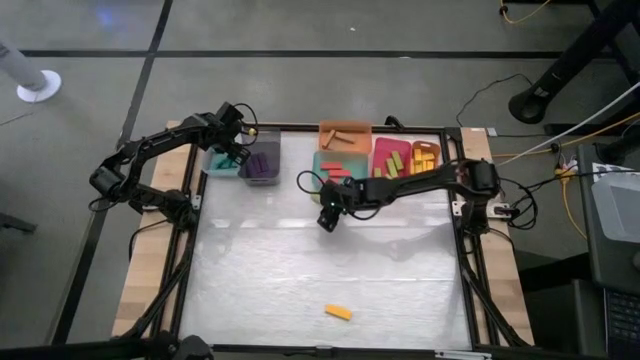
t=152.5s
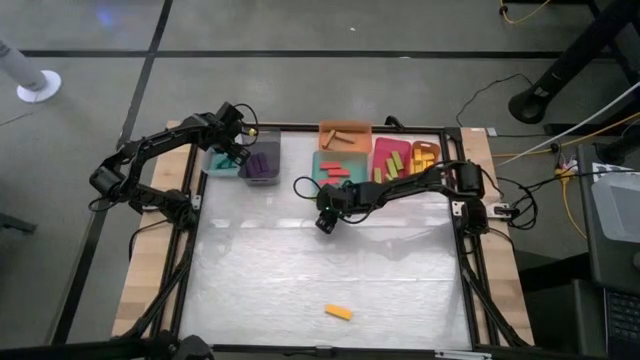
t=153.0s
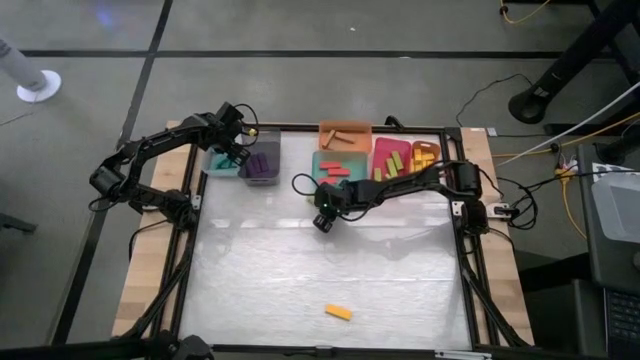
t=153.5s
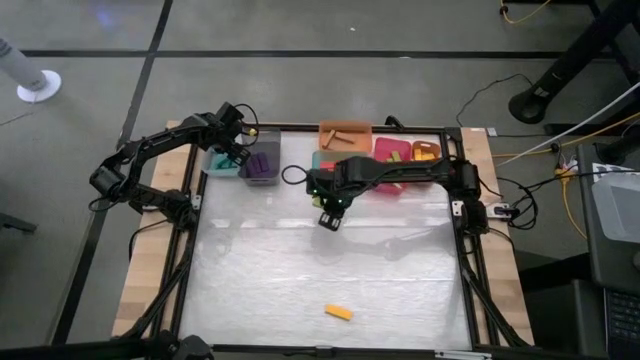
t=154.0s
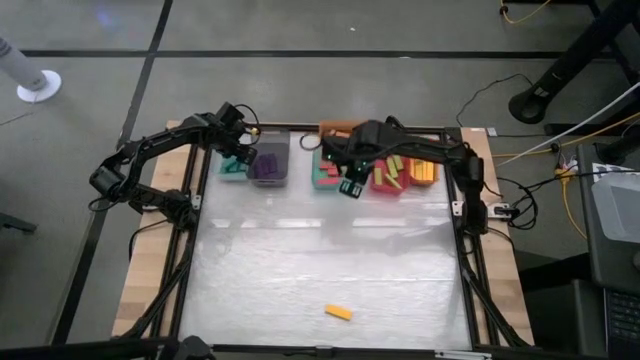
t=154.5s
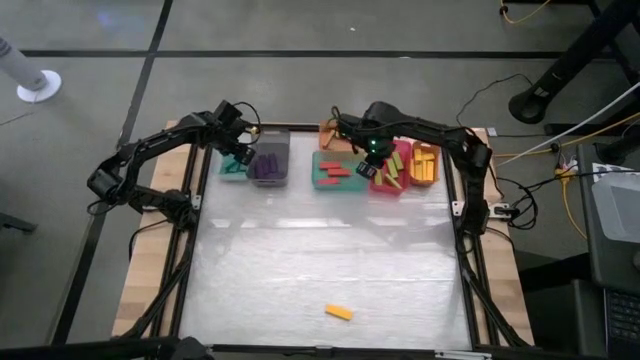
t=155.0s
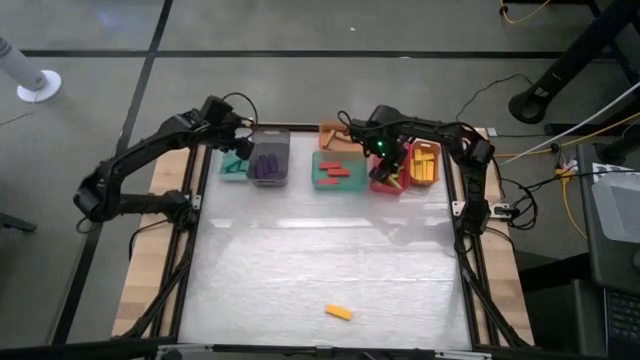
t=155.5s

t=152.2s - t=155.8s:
Task: Sort blocks
Put the light green block into the pink bin

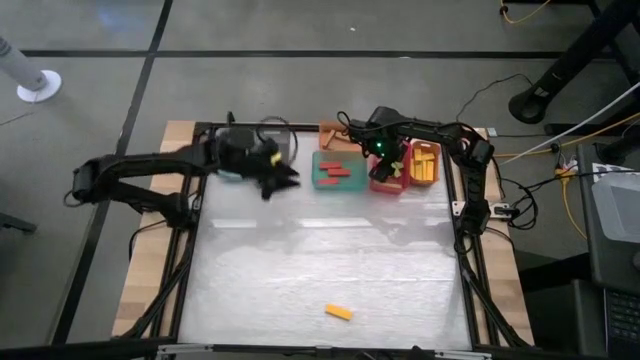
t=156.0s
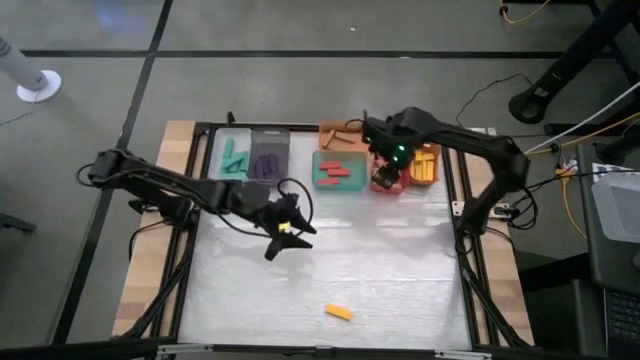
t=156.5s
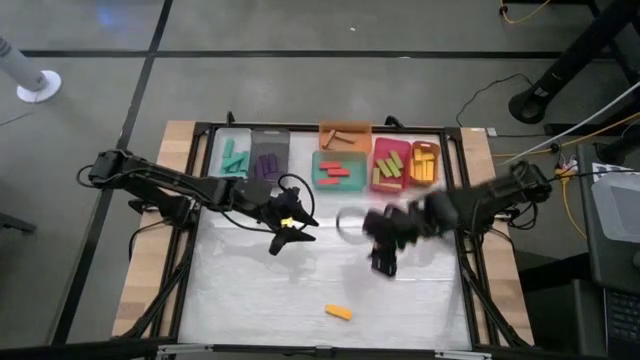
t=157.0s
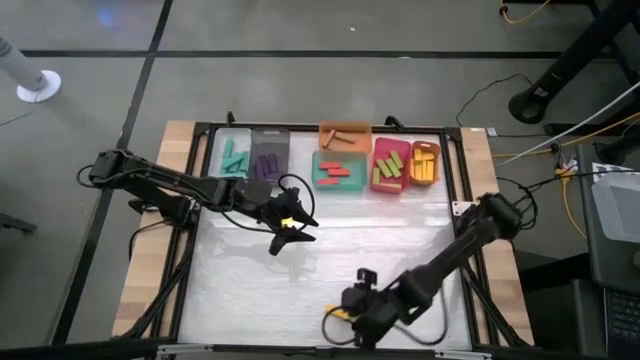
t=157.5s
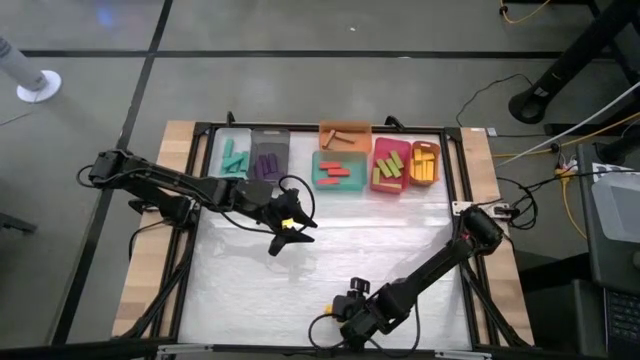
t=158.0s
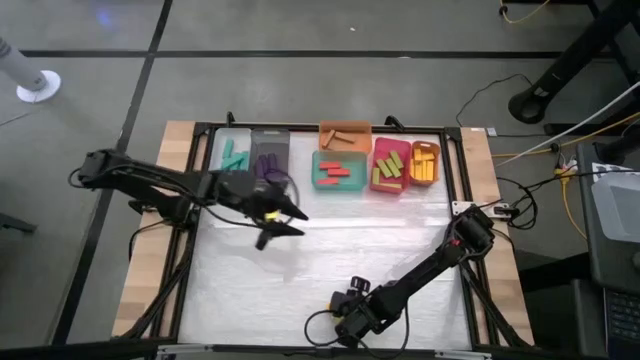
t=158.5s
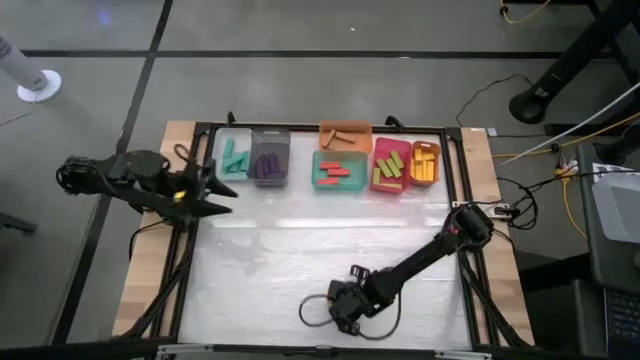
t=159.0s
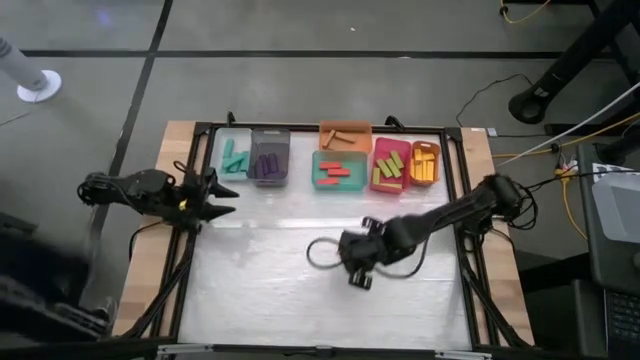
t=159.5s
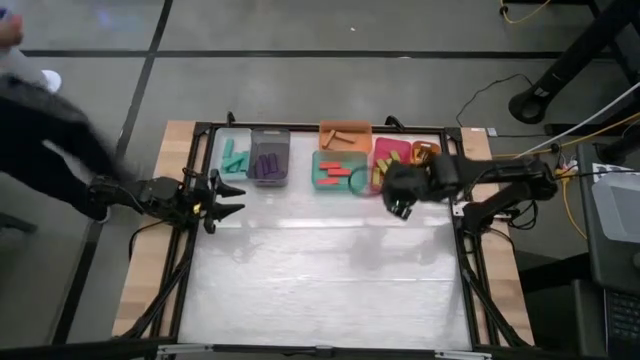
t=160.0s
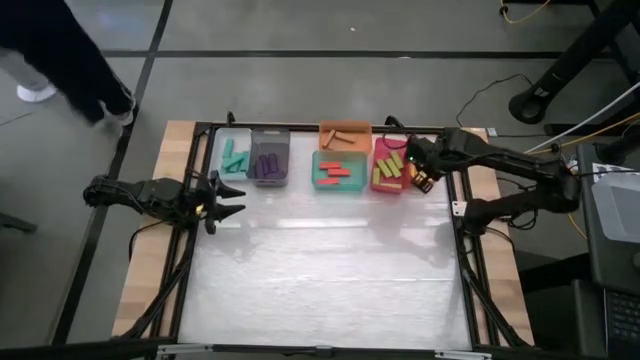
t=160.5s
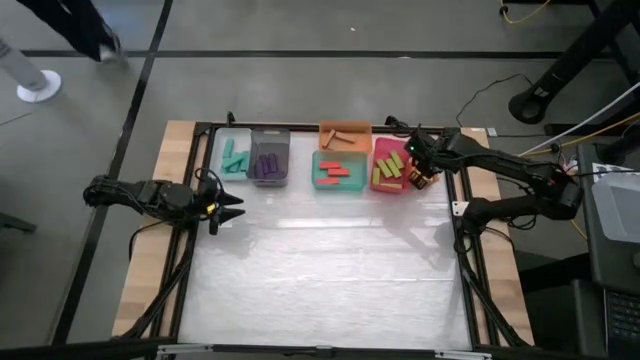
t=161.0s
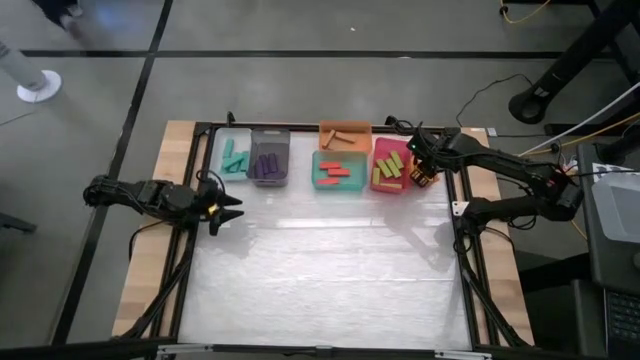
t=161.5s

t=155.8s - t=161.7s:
Put the yellow block into the right orange bin

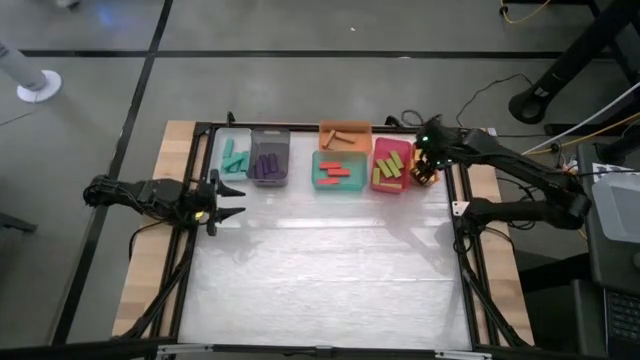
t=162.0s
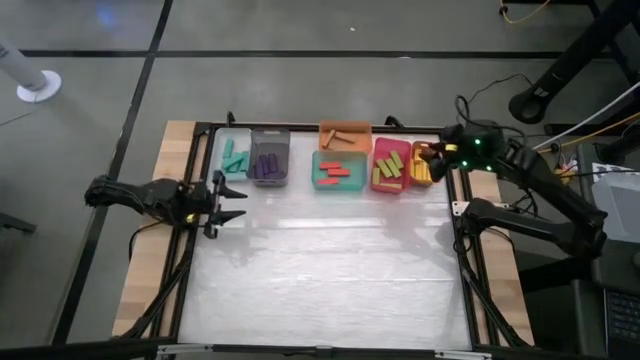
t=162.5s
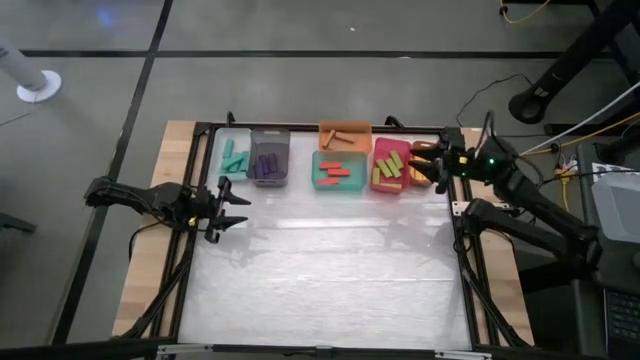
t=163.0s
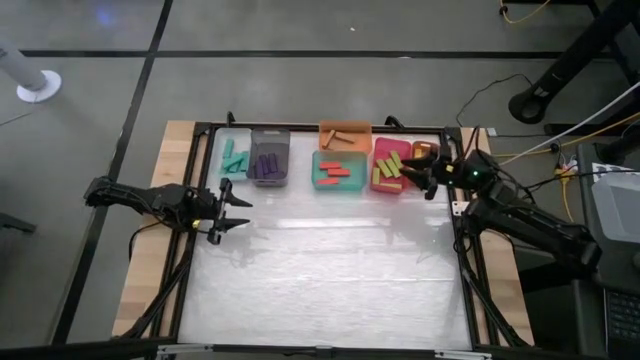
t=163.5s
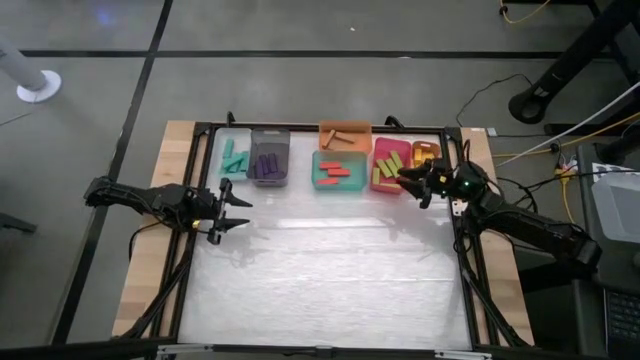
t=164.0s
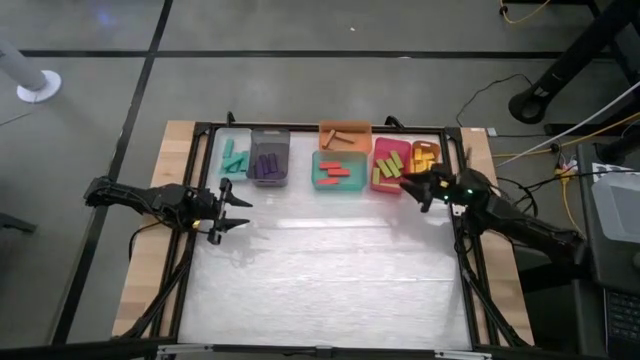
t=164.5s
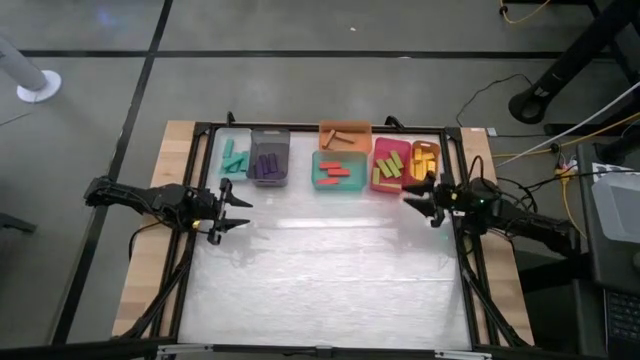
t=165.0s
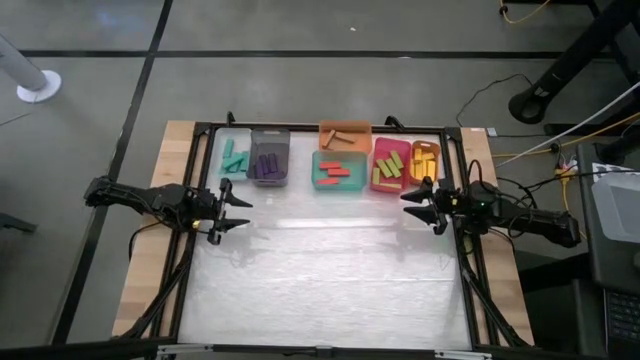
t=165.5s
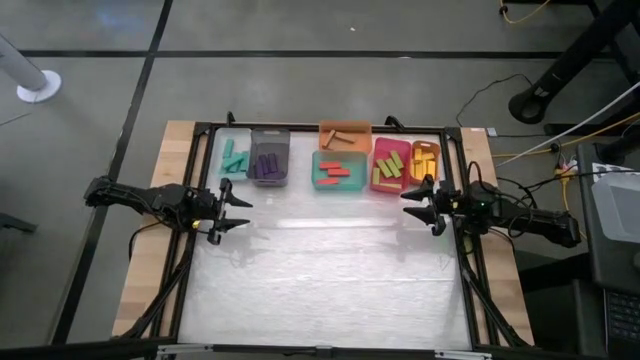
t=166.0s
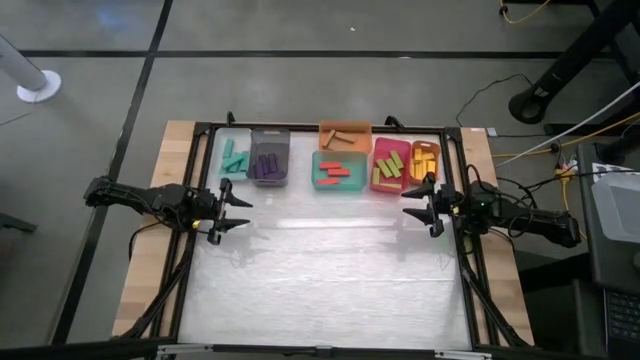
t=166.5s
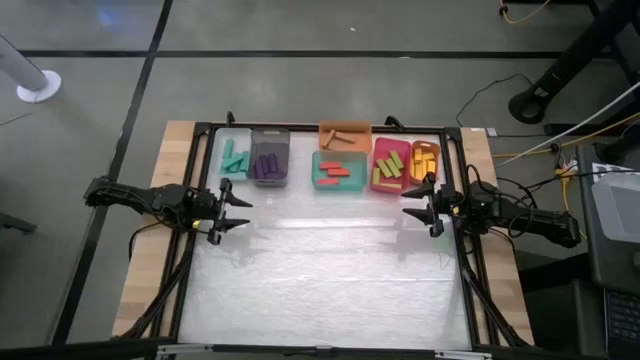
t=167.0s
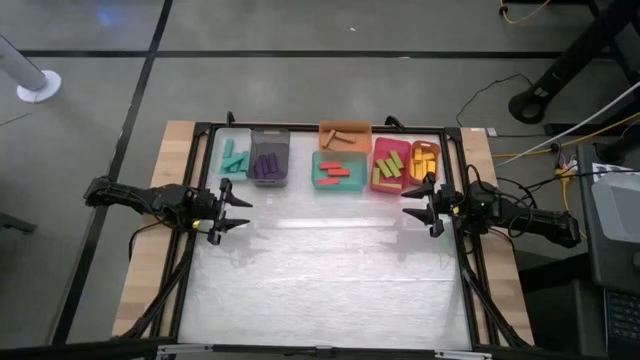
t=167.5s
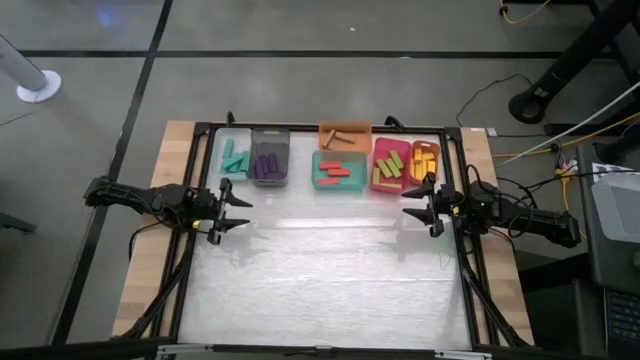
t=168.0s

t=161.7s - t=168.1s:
Return to Home Position

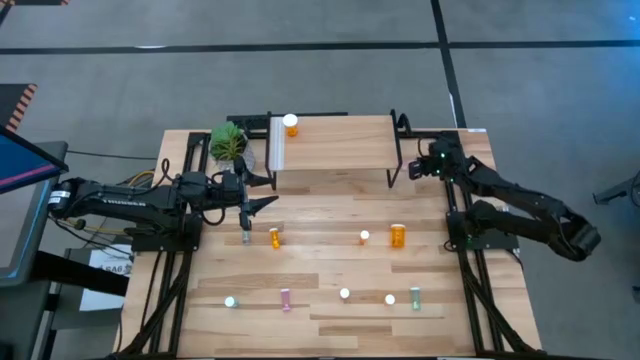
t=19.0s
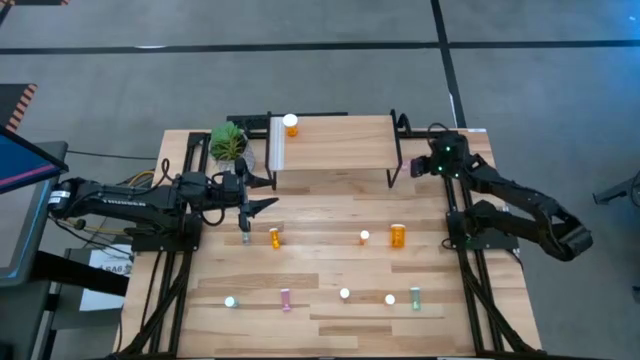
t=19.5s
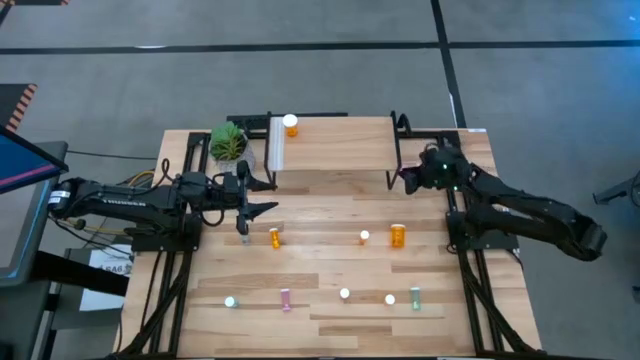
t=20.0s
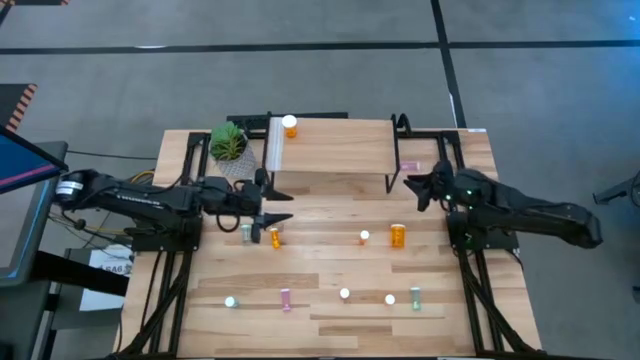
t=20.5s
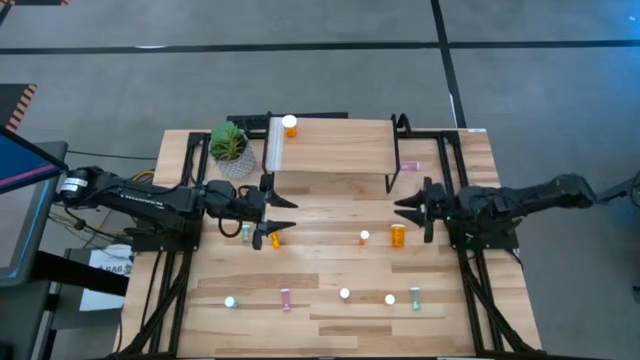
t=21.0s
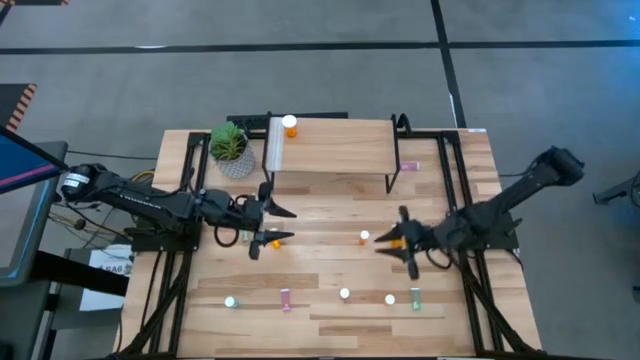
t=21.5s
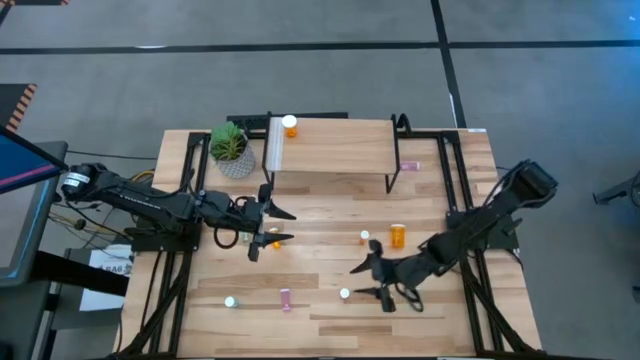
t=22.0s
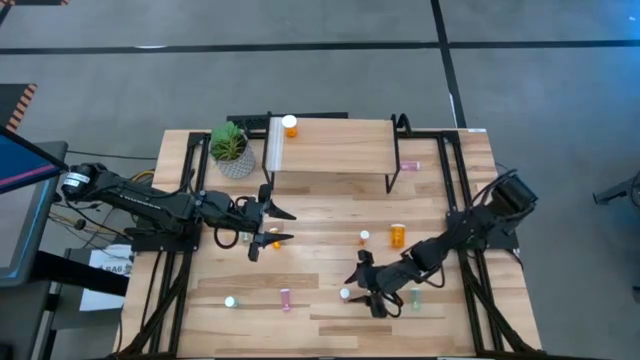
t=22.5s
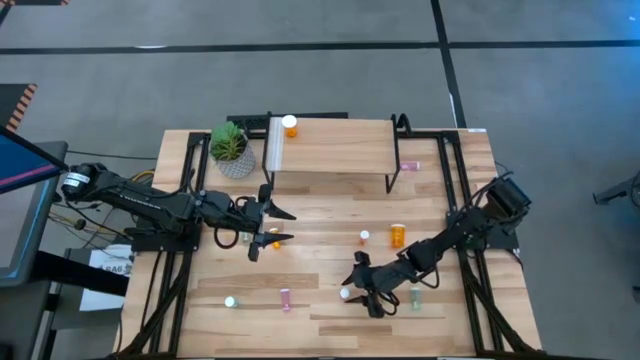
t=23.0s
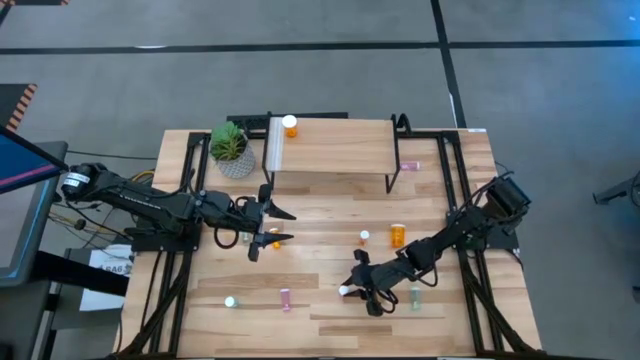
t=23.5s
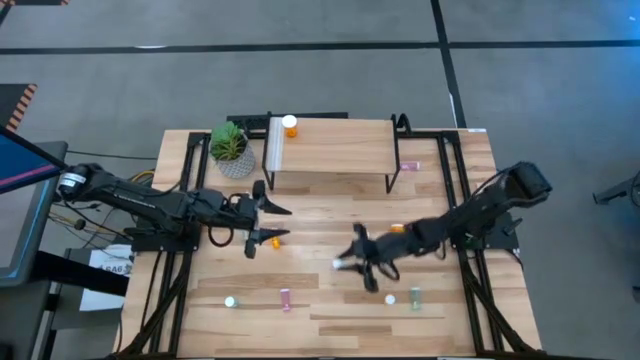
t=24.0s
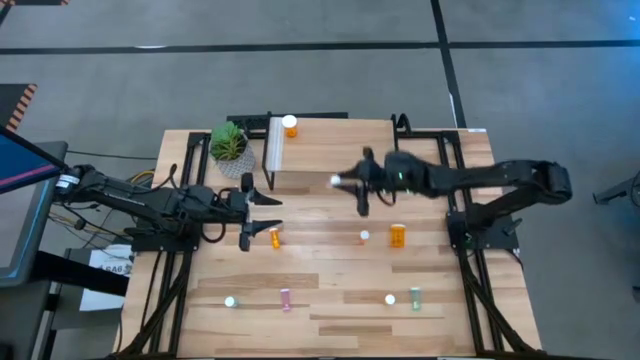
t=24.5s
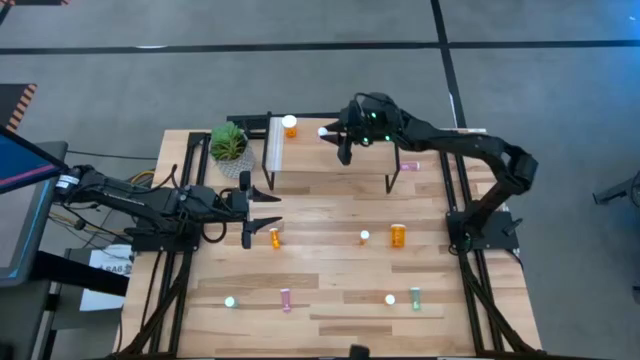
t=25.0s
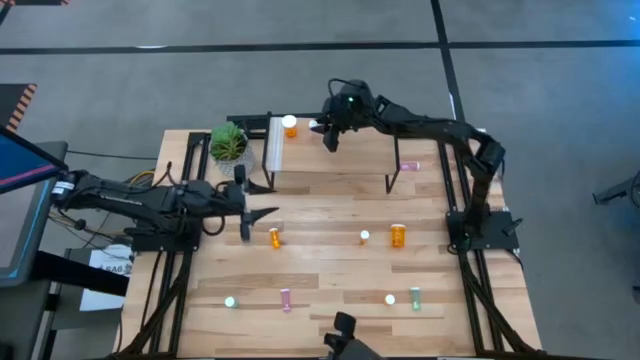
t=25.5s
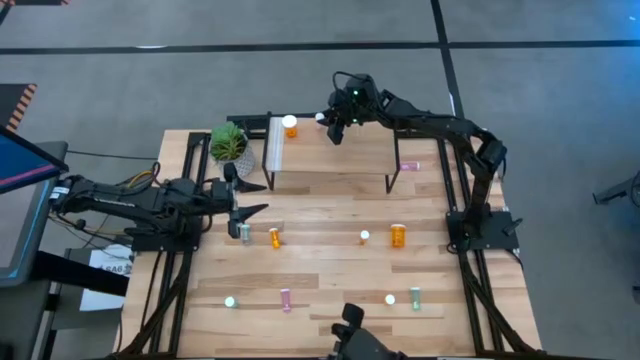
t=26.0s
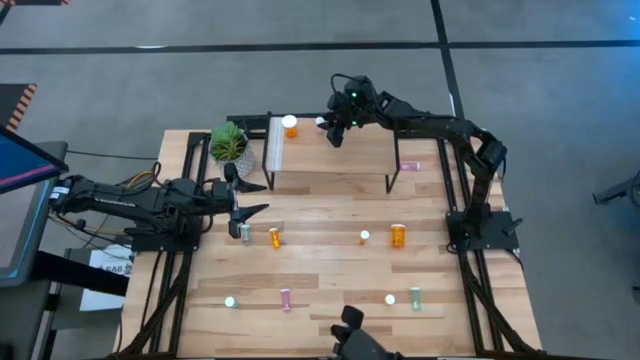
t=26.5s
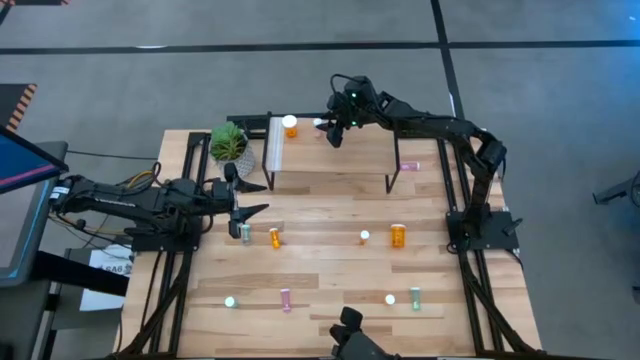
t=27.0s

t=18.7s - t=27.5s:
Task: Pick and place medicine bottles onto shelf by color
Put the right pink bottle on the shelf
